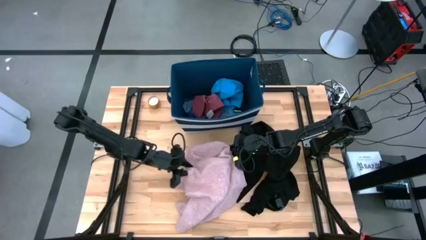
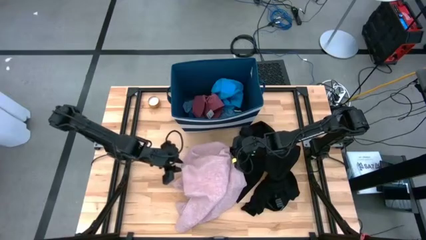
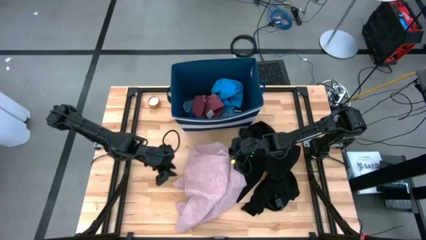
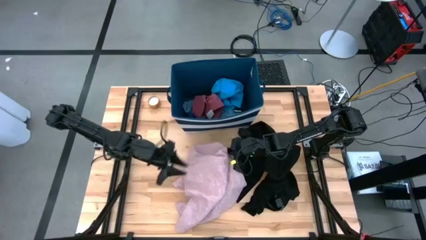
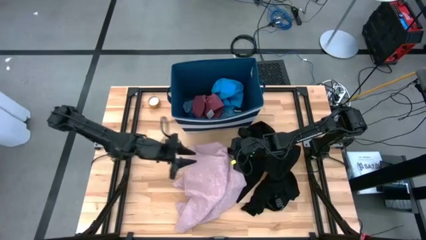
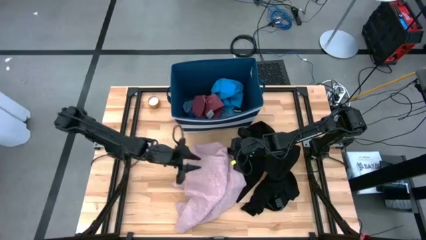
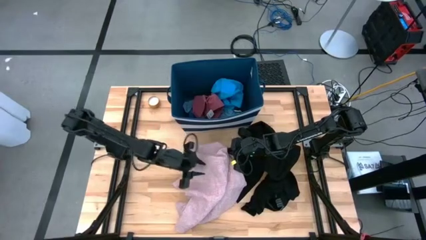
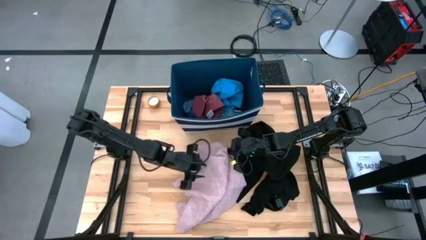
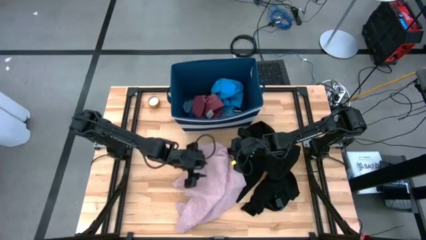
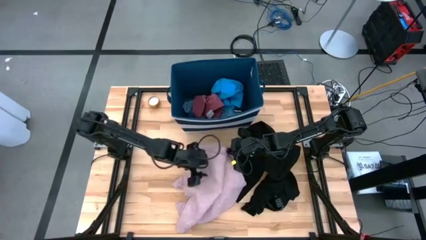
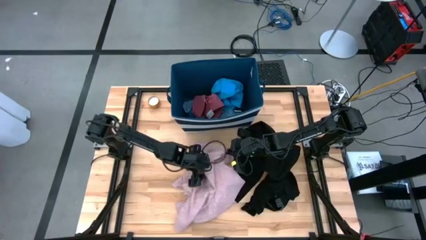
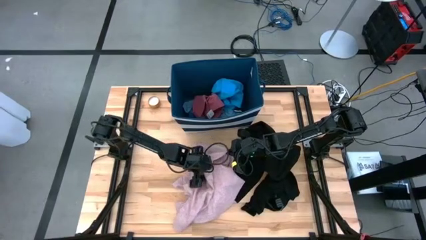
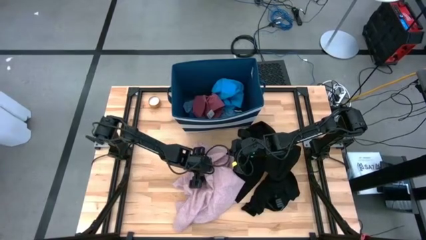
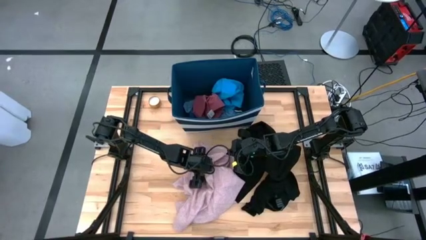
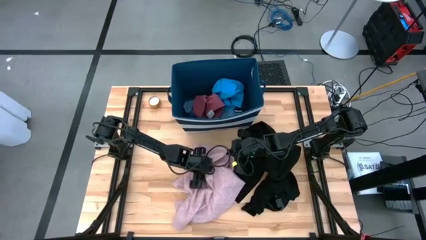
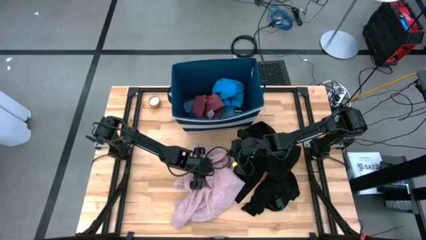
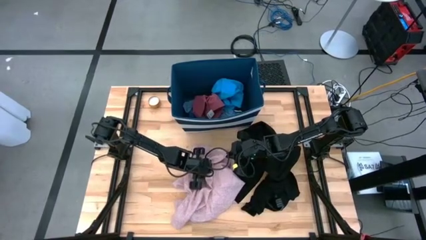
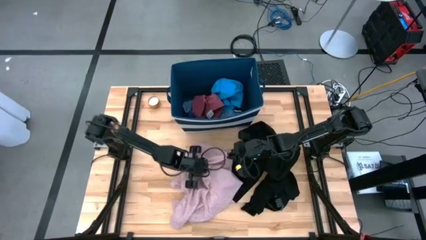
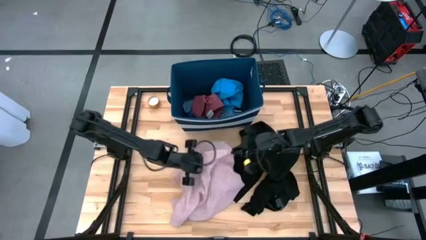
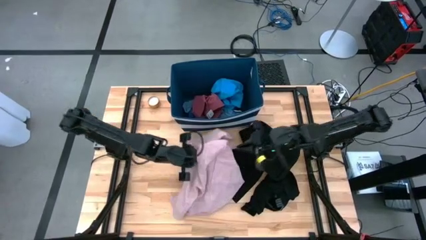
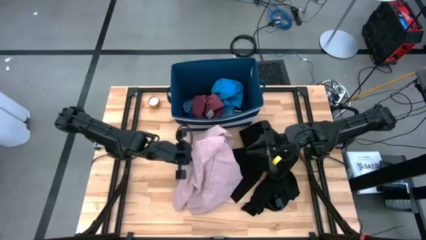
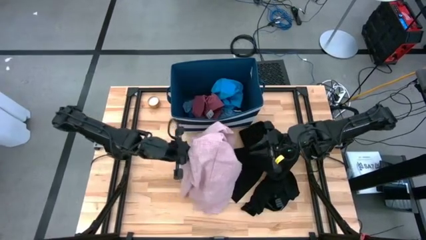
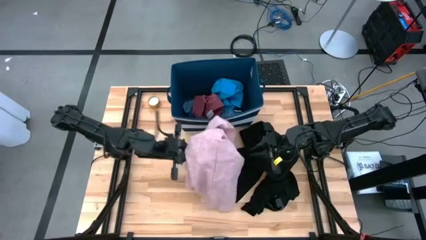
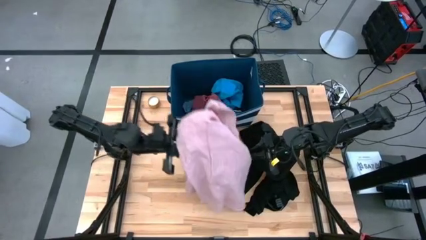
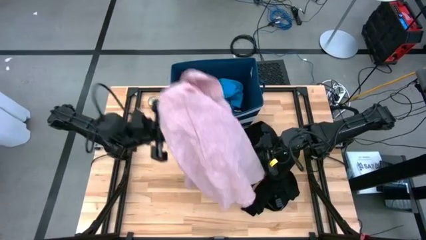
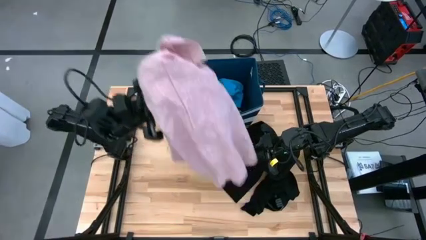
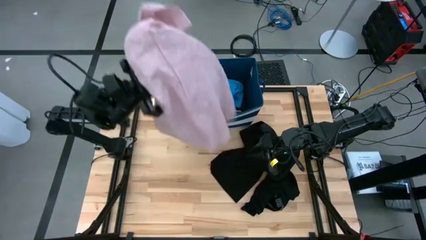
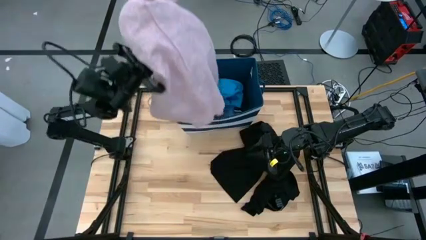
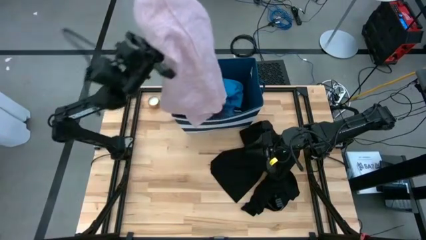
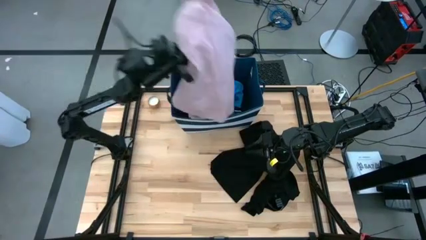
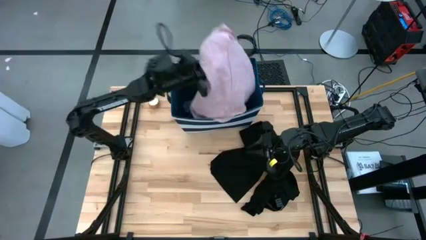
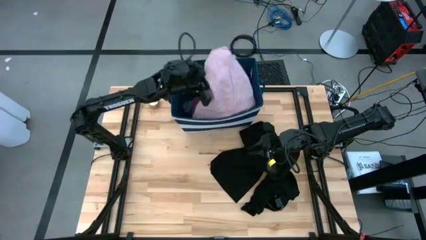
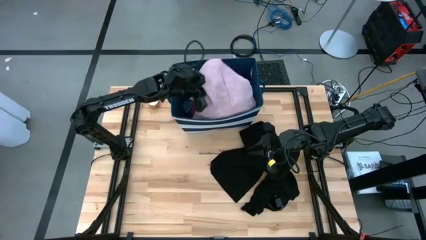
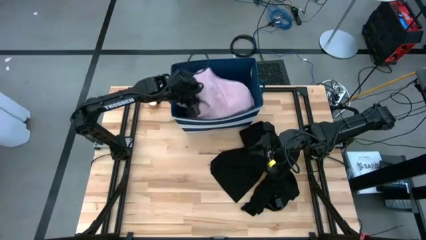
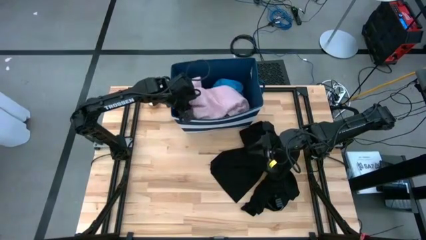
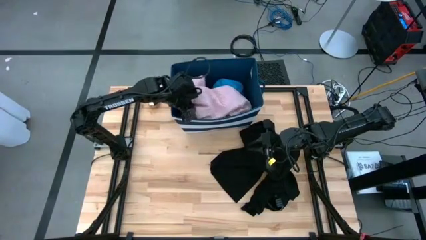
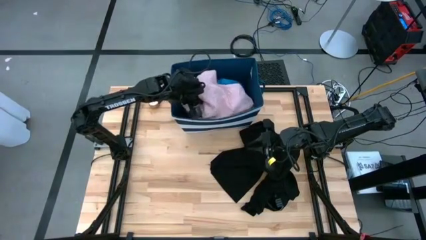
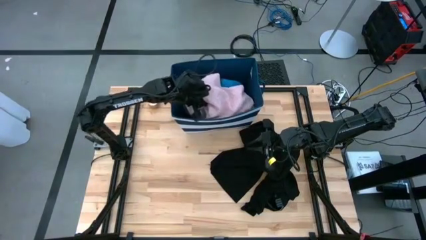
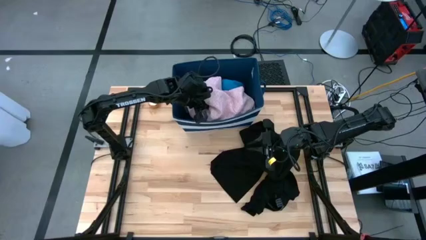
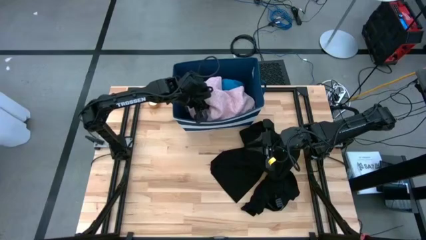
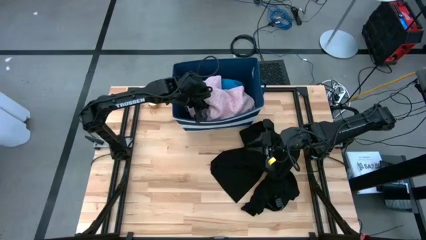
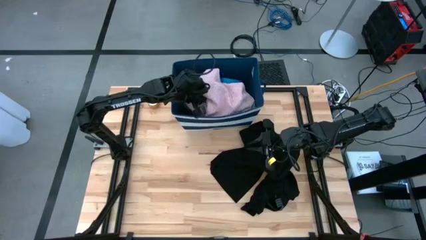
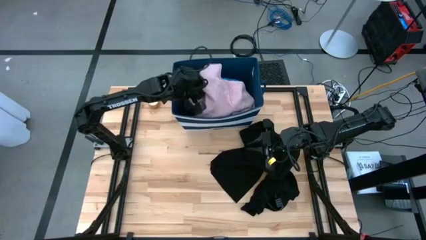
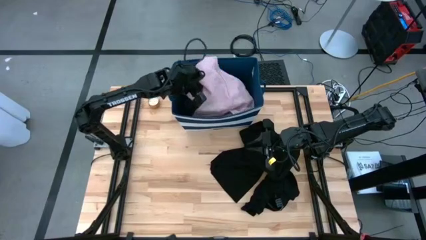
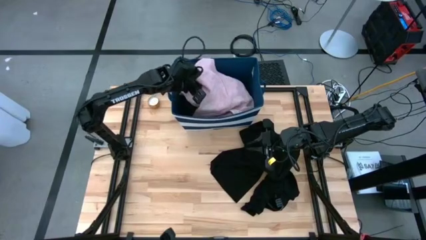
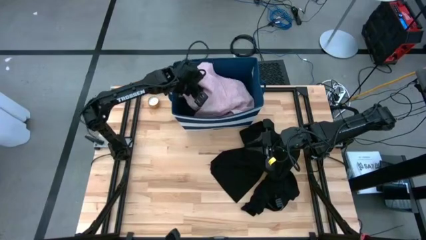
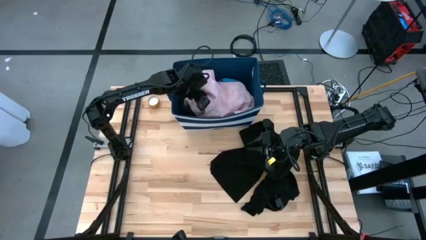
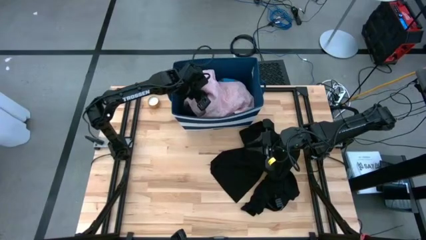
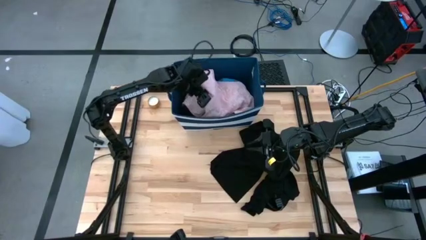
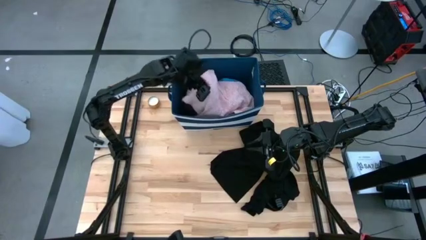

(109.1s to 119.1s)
Task: Sort clothes
Put the pink polo shirt into the blue laundry bin

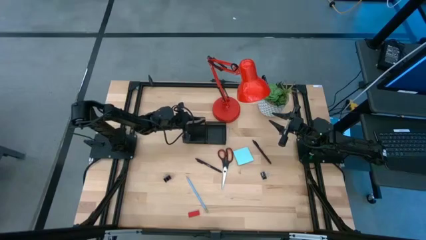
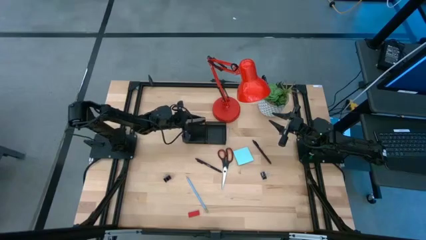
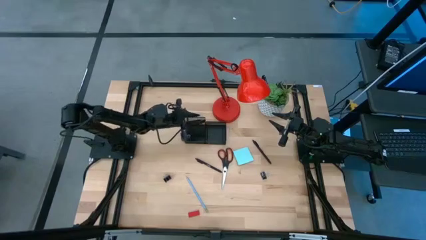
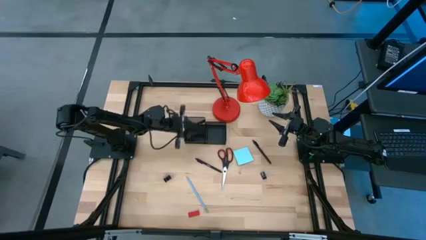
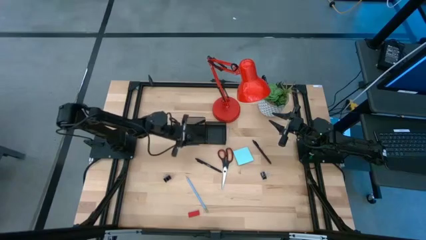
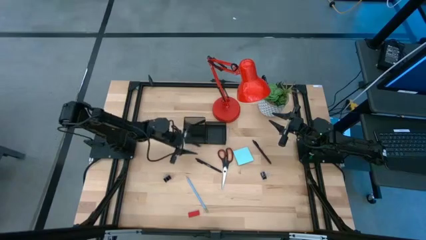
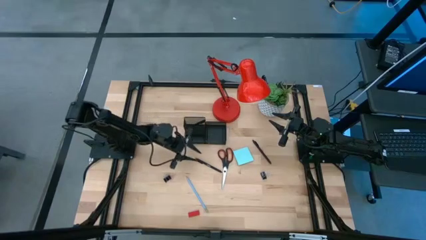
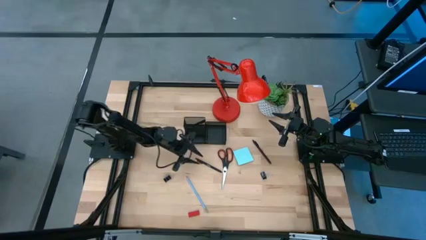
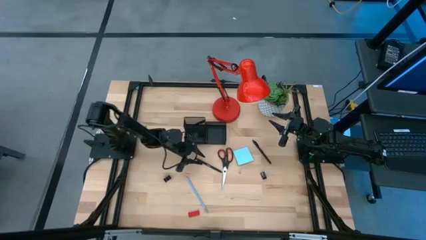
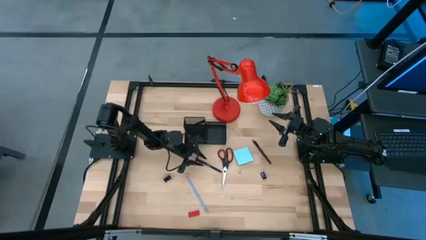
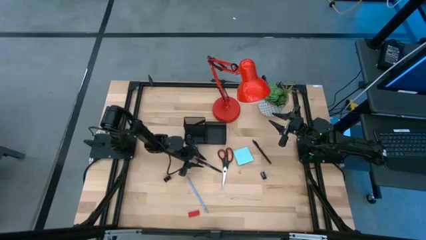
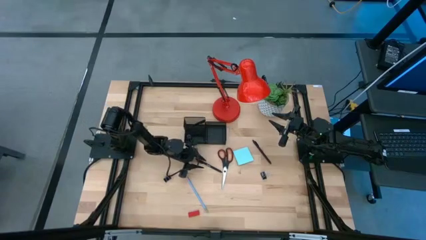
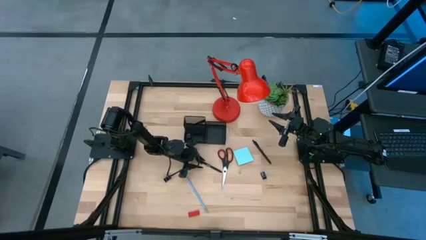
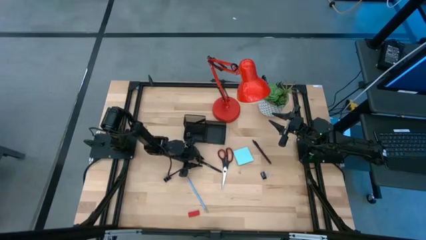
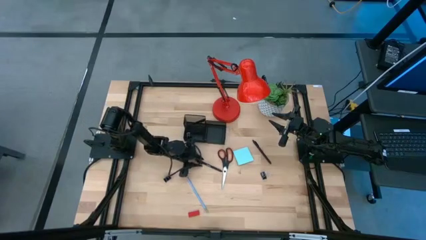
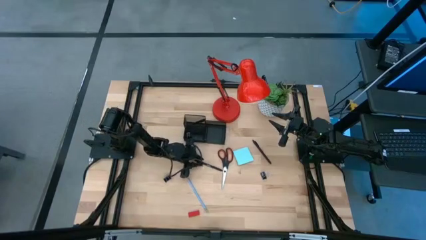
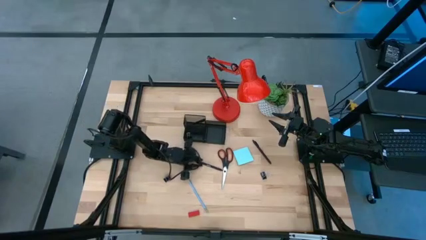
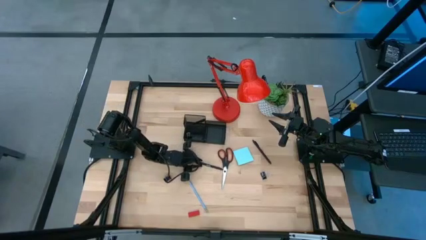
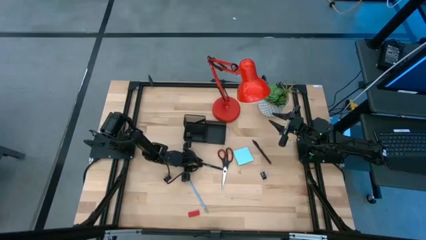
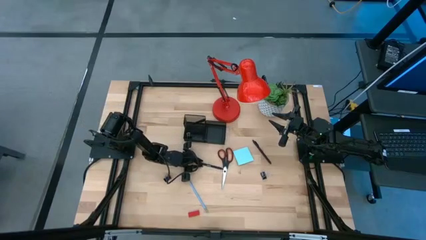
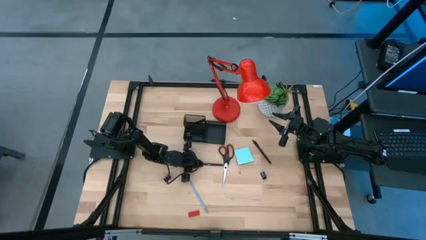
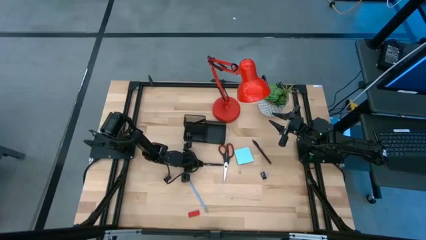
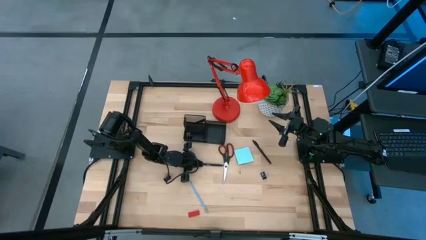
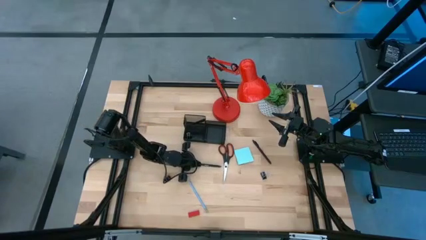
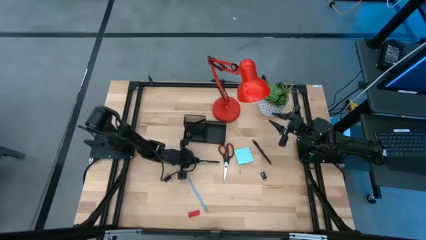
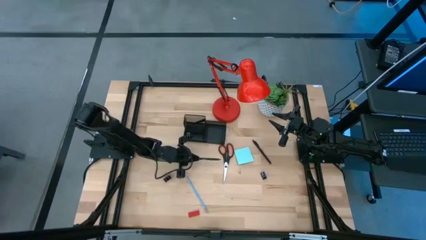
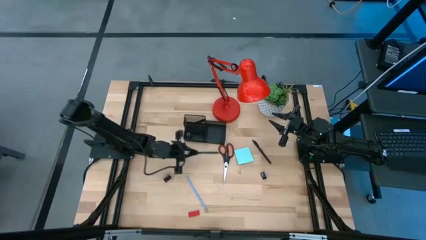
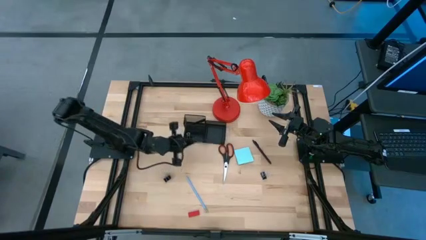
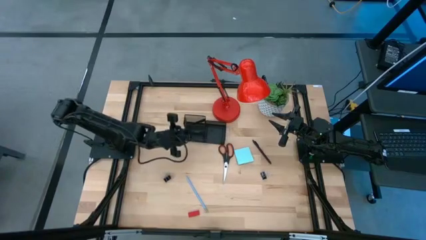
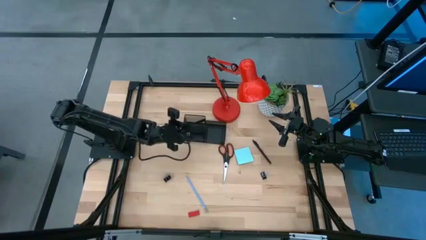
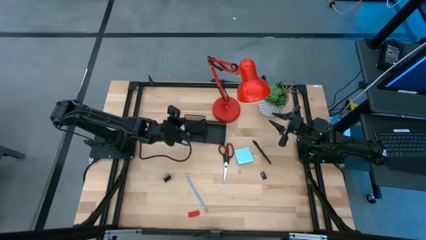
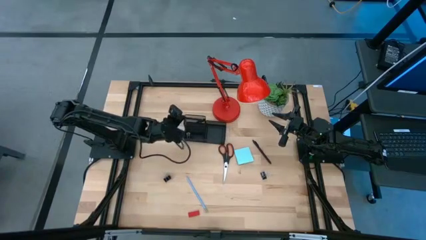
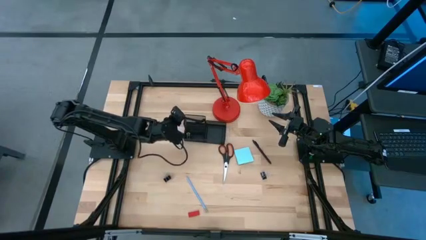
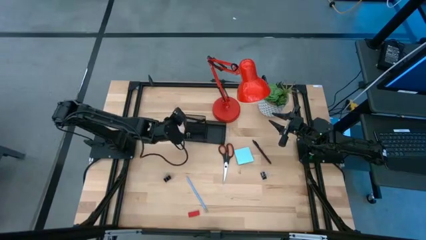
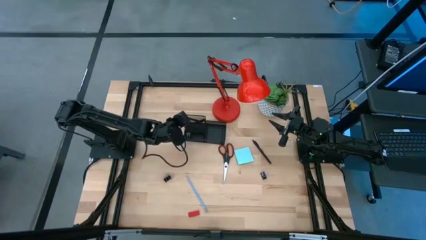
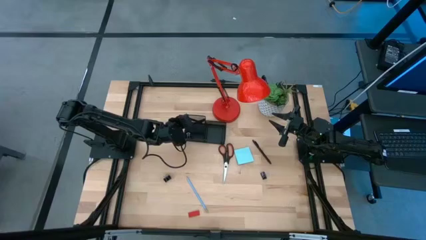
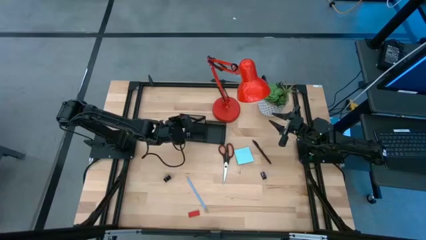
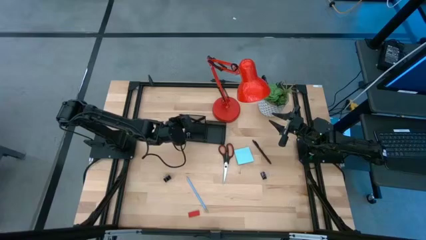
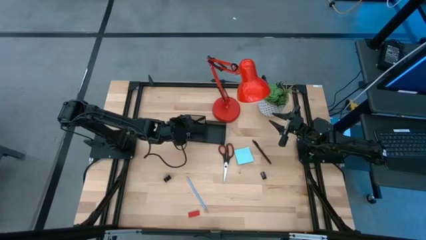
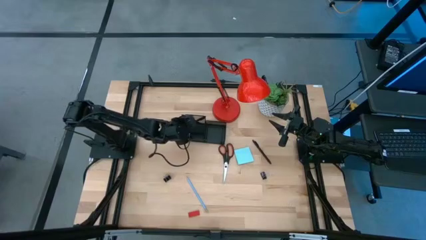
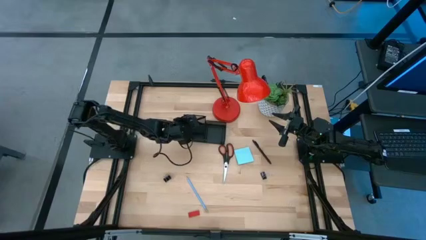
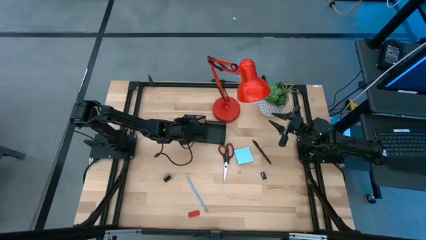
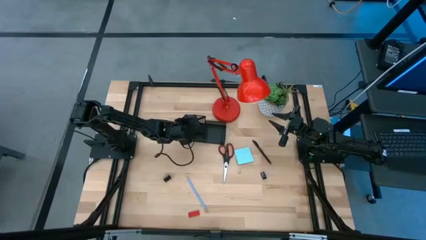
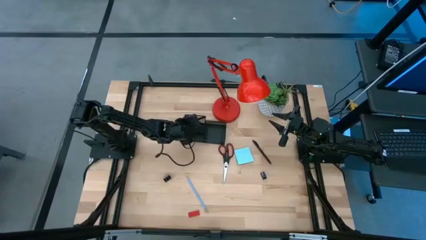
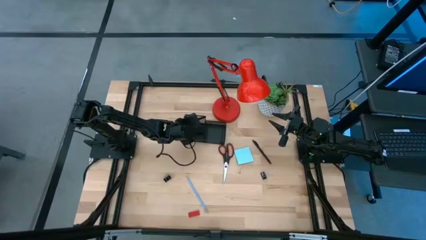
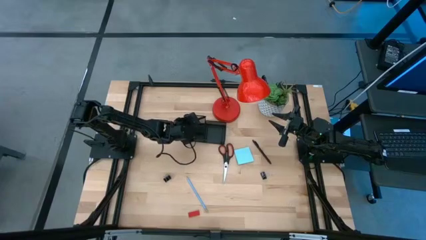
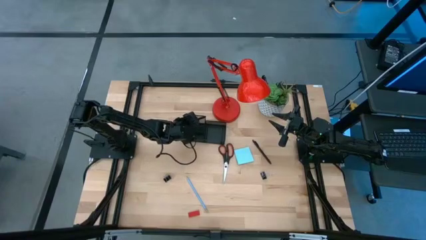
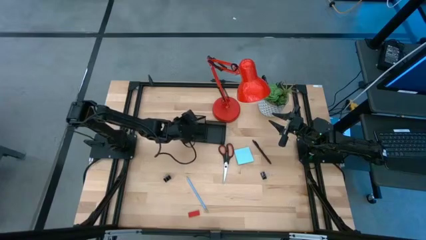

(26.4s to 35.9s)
Task: Pick and place office supplies into organizer
Put the left black pen into the black desk organizer
